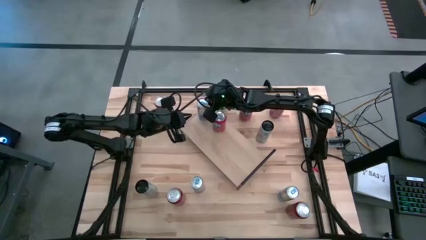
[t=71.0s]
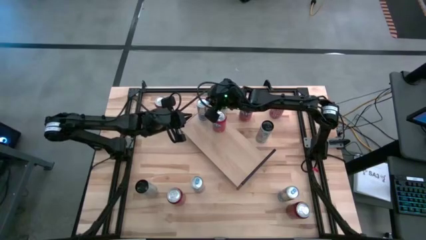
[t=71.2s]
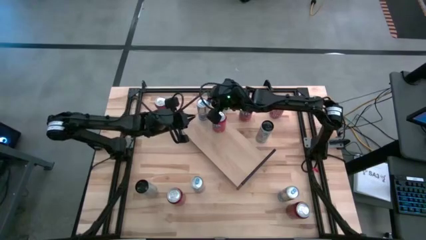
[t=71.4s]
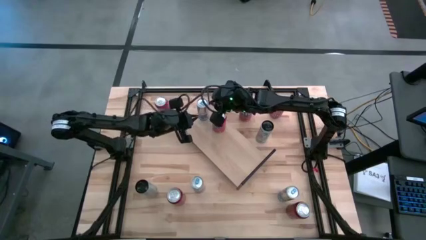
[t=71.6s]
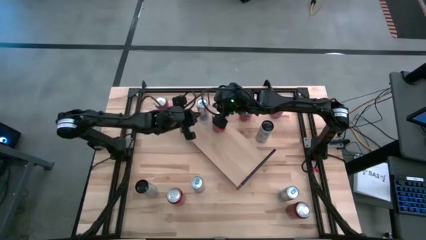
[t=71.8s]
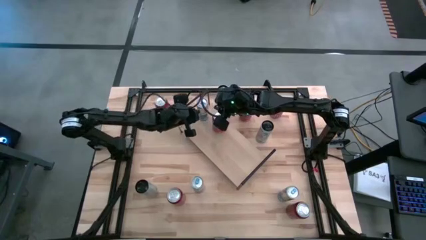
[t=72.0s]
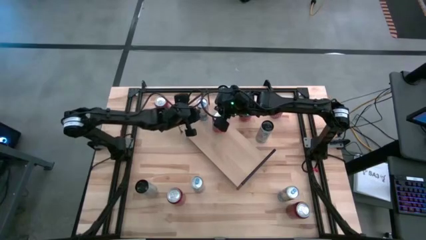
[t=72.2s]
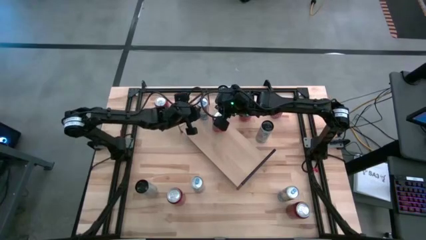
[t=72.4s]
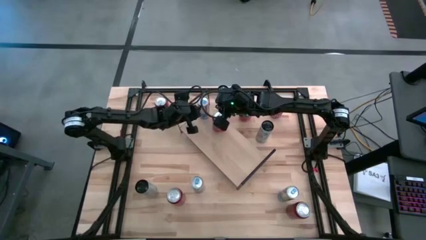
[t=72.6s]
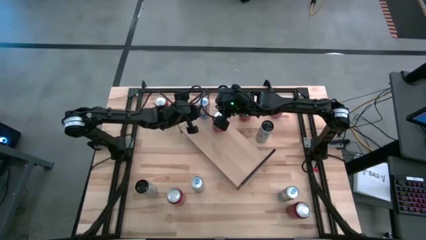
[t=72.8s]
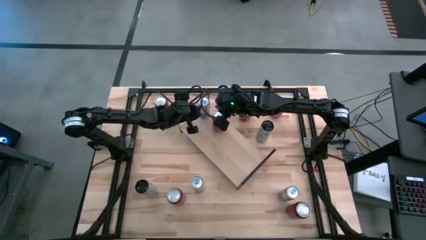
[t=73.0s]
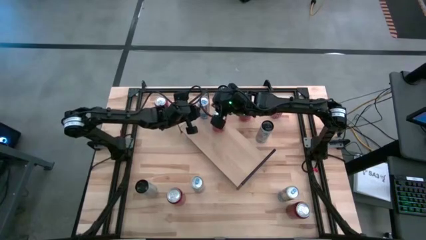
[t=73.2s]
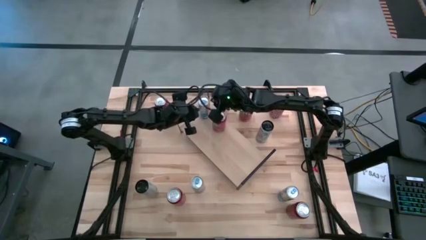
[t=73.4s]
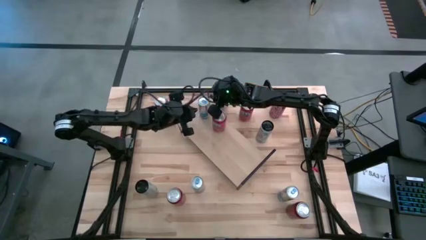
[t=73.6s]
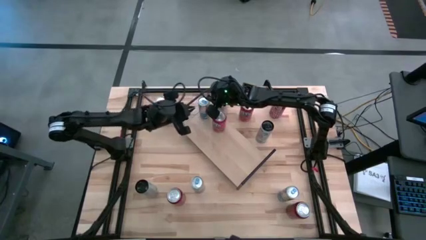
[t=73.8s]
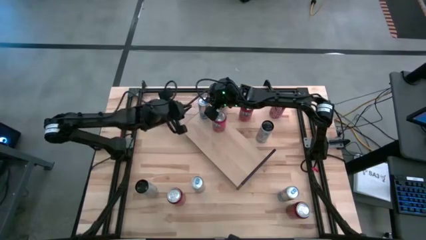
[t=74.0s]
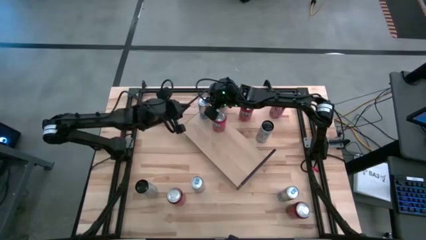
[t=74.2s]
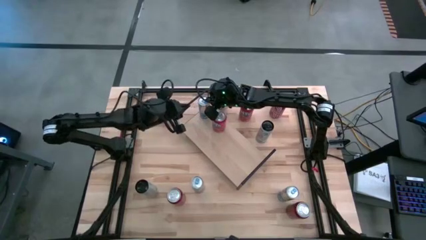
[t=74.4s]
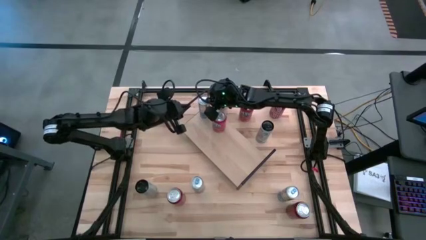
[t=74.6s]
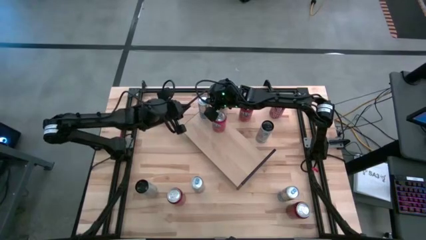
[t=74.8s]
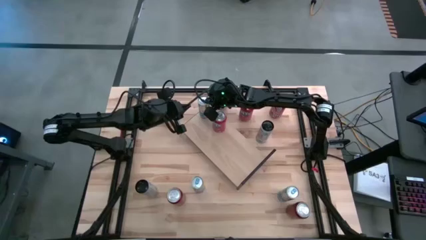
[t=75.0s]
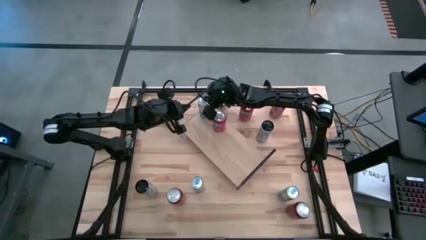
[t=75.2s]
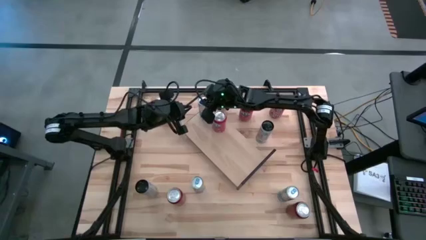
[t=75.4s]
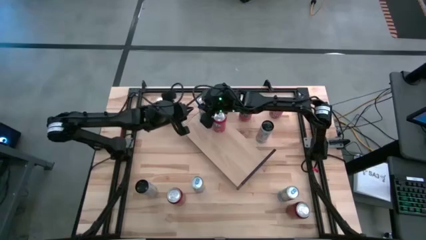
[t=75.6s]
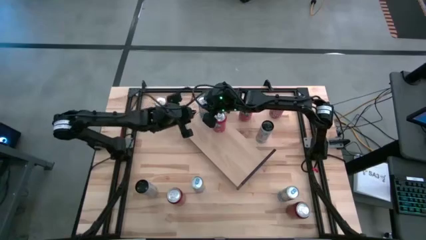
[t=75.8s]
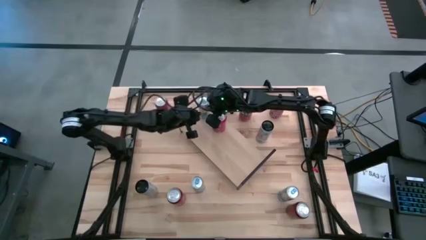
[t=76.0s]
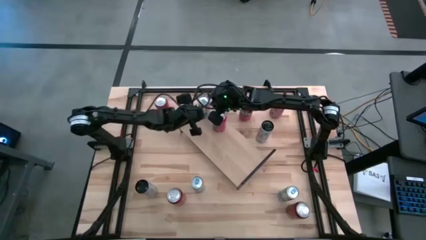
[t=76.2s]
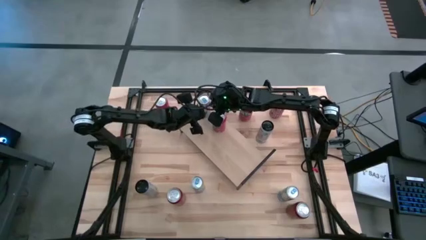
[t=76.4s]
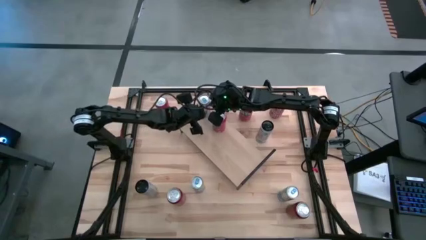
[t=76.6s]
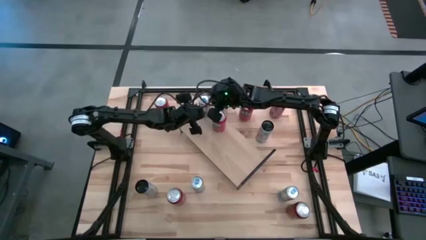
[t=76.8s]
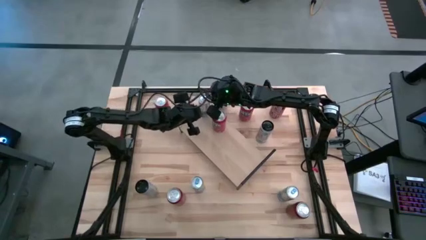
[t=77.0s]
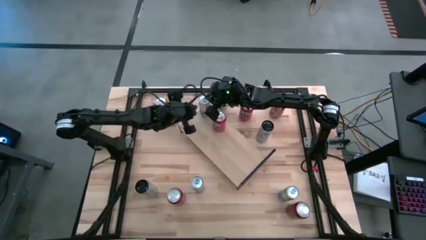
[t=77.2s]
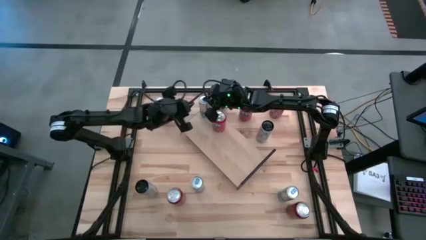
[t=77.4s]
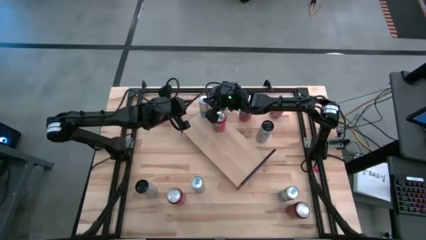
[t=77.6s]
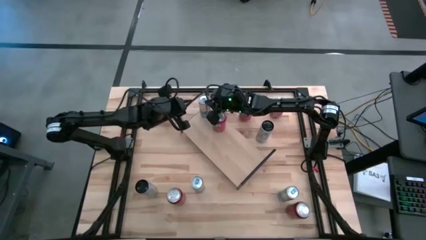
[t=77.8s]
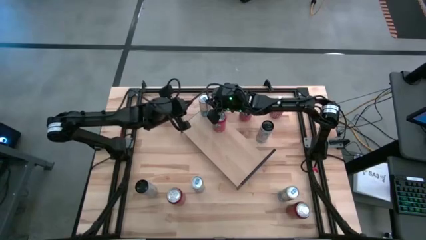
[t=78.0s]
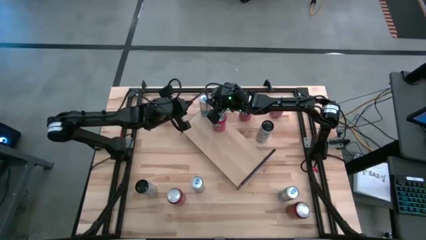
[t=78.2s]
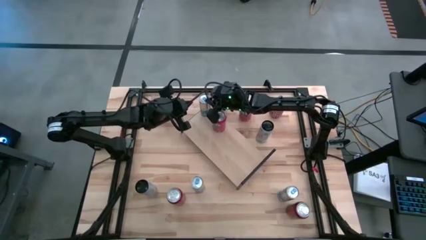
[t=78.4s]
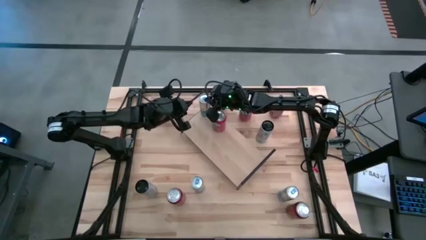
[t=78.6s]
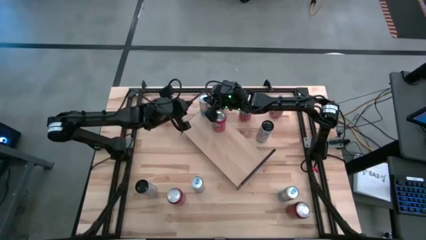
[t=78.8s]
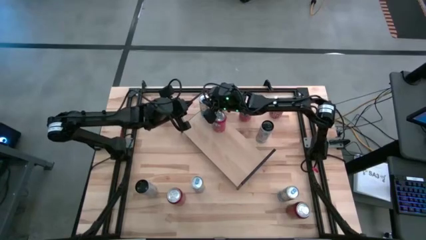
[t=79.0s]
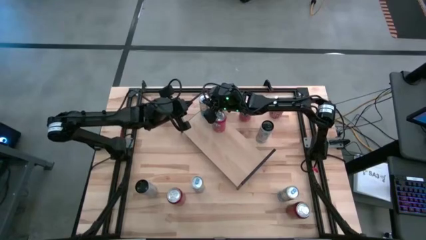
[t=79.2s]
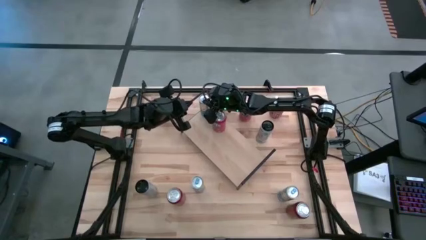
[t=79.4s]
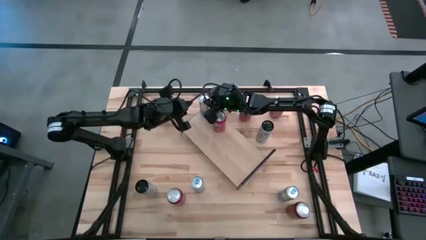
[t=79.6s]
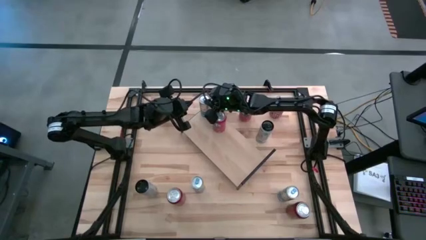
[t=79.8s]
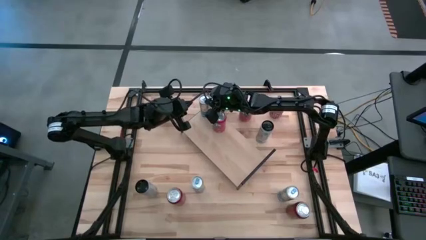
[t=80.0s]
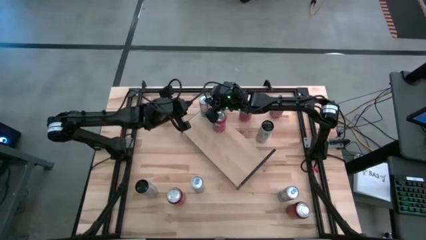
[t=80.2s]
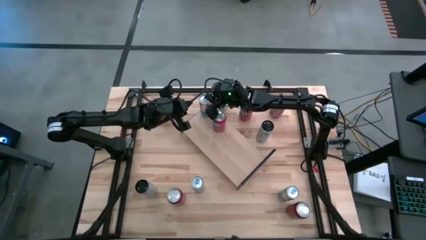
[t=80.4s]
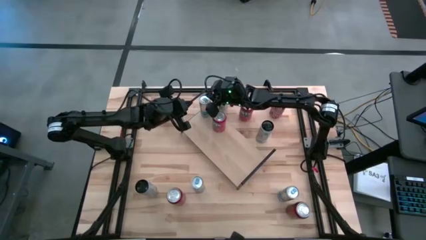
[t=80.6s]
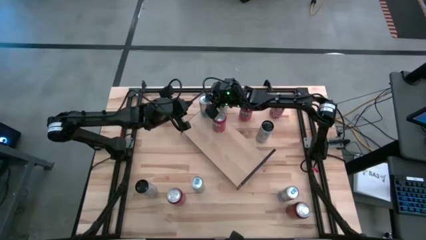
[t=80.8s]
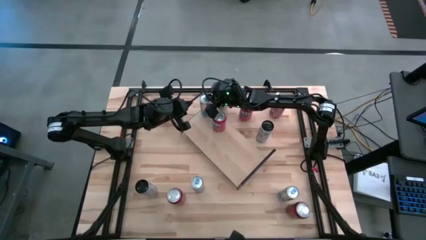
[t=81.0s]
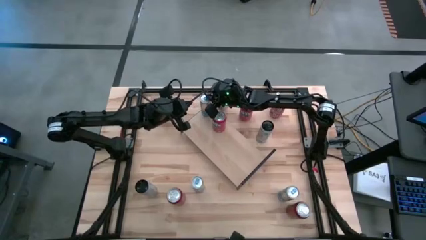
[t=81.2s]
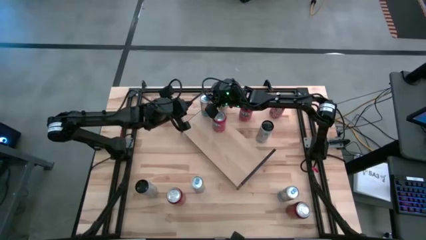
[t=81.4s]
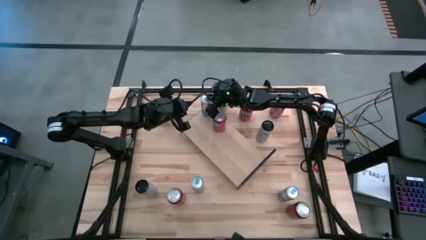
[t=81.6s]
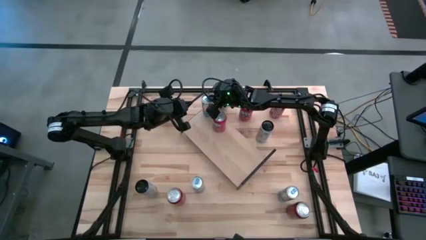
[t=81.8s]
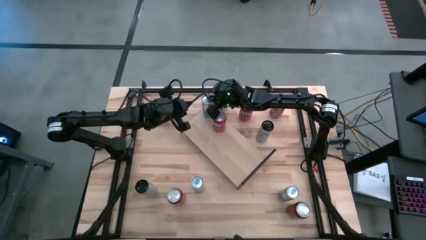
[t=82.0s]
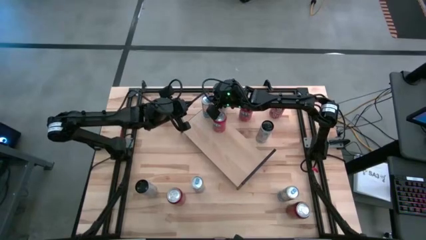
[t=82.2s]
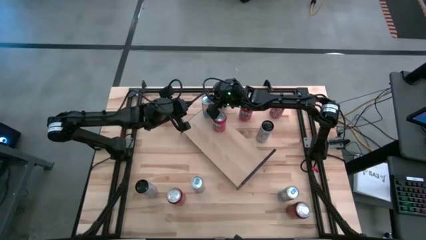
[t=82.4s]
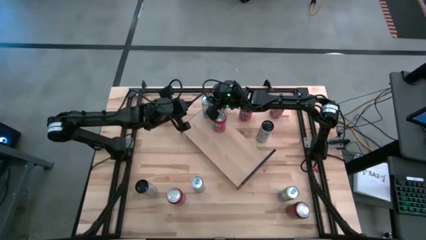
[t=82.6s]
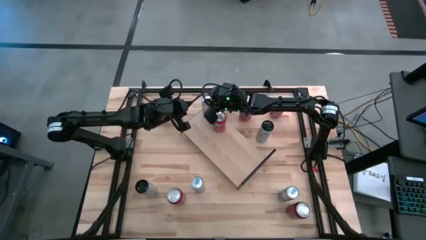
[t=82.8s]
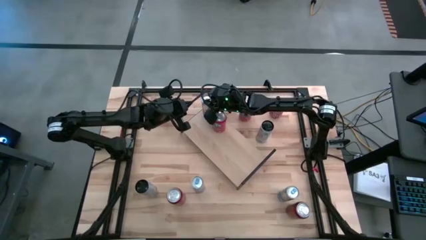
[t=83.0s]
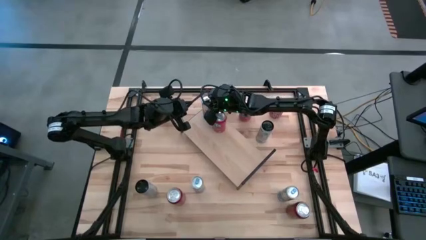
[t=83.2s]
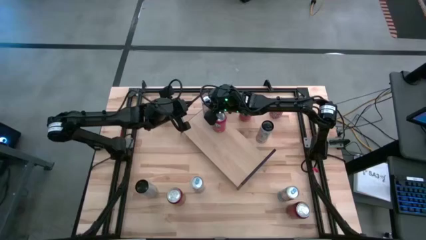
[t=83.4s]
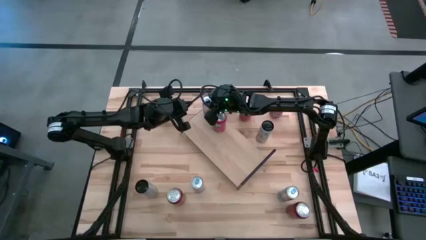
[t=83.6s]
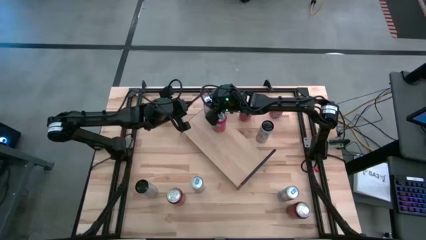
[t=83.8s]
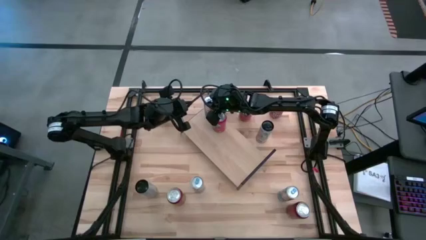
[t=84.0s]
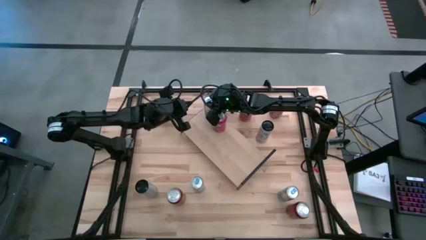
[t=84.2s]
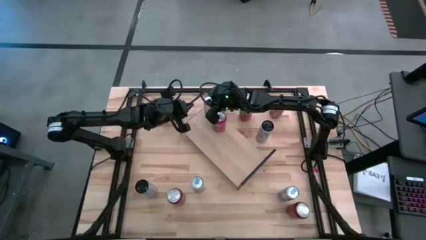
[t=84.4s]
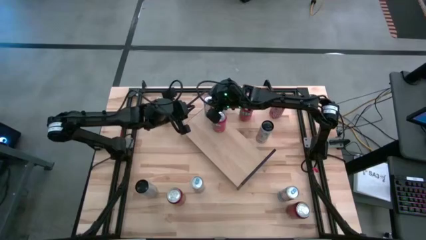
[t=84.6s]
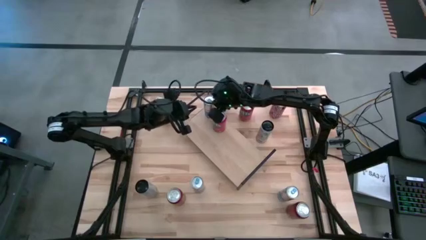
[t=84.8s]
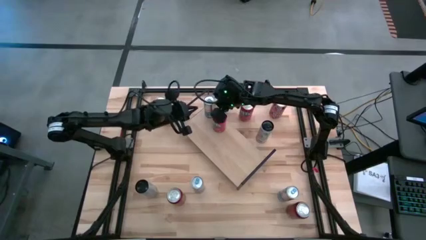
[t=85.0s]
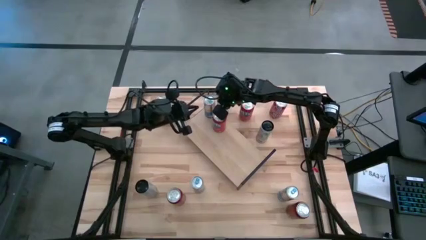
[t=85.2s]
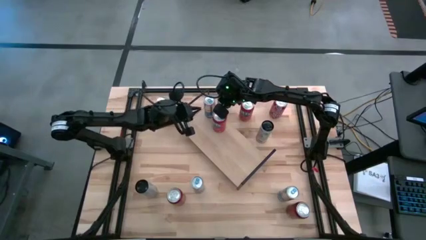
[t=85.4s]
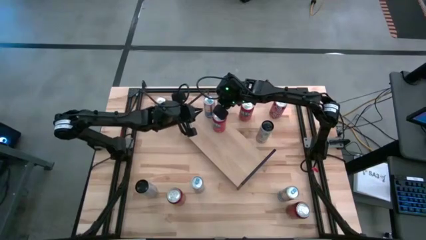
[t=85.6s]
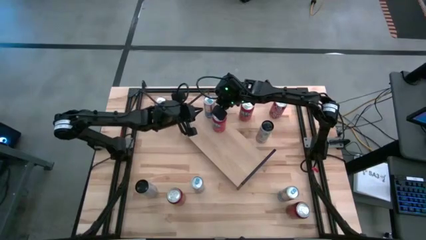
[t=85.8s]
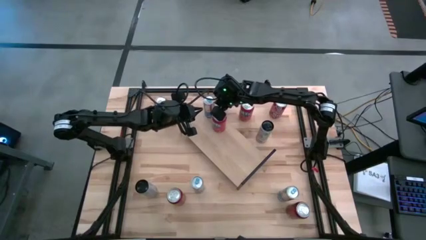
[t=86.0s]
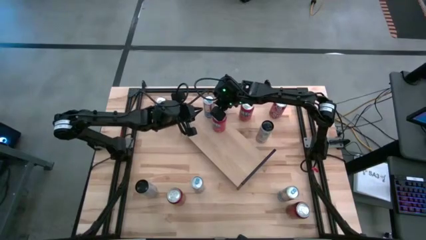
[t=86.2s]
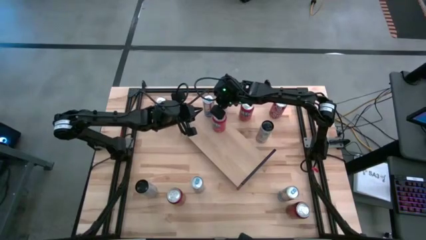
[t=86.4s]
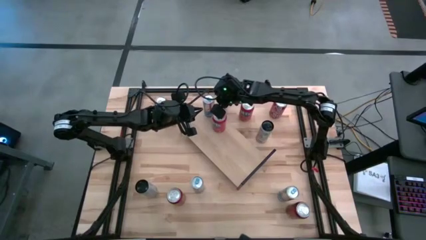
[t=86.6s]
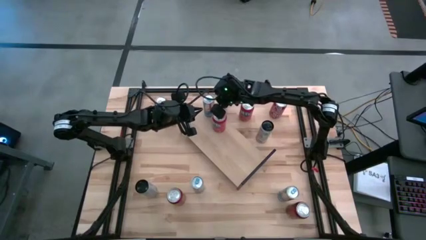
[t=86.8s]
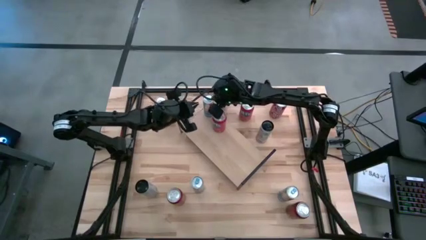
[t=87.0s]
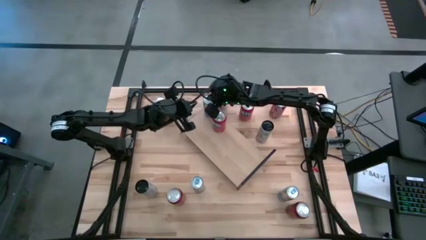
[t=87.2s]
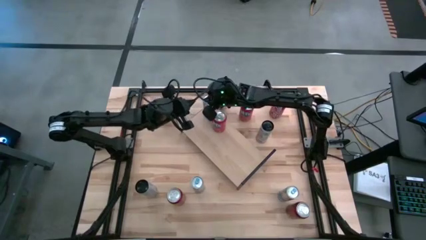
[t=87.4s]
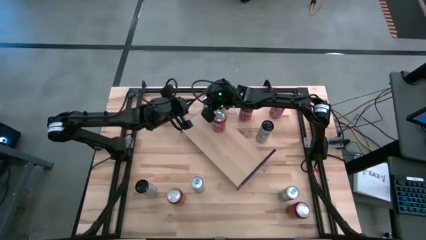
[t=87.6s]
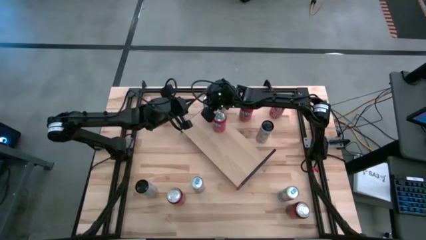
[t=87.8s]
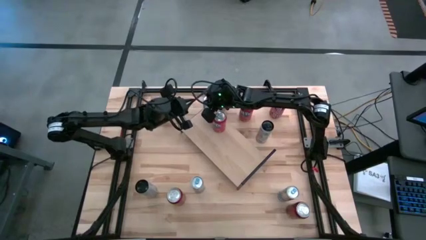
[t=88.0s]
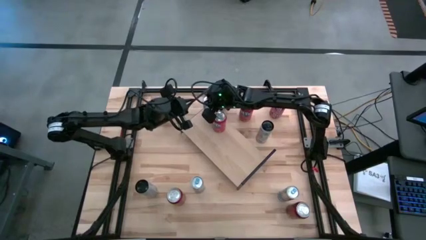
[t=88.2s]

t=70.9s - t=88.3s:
Task: Place canned beverage on shelf
Put the center blue soda can on the shelf
